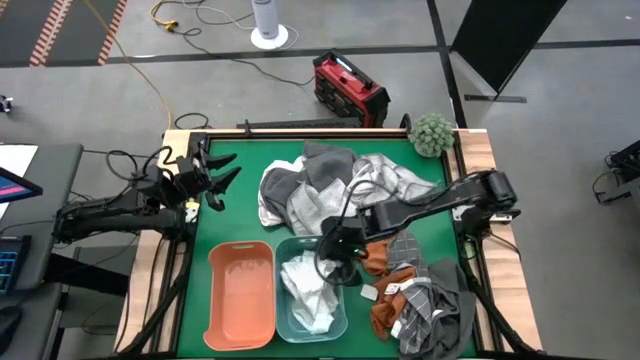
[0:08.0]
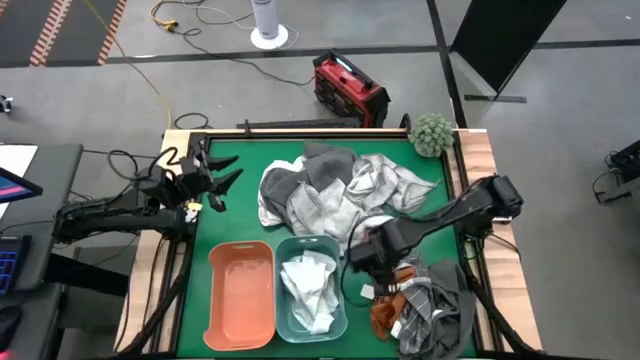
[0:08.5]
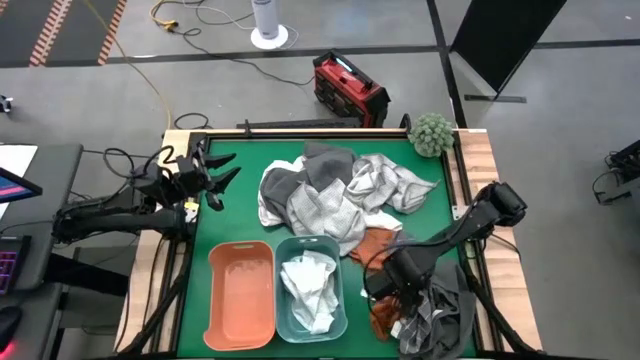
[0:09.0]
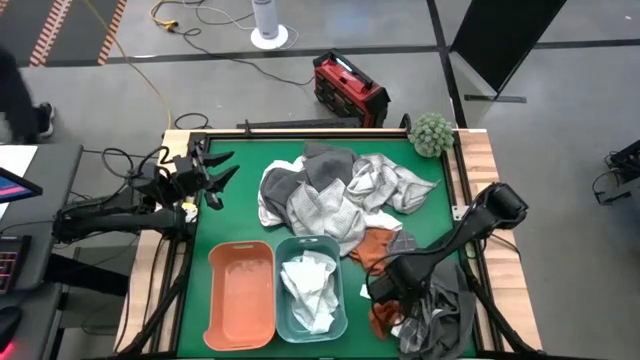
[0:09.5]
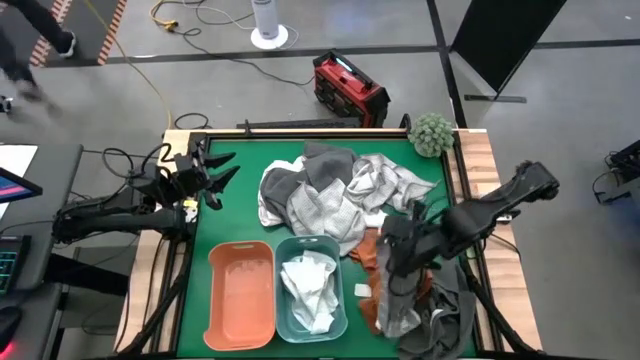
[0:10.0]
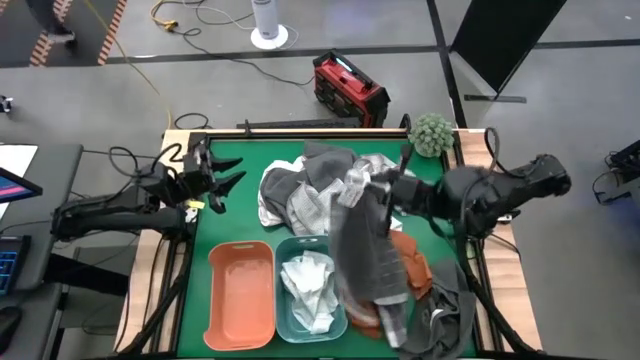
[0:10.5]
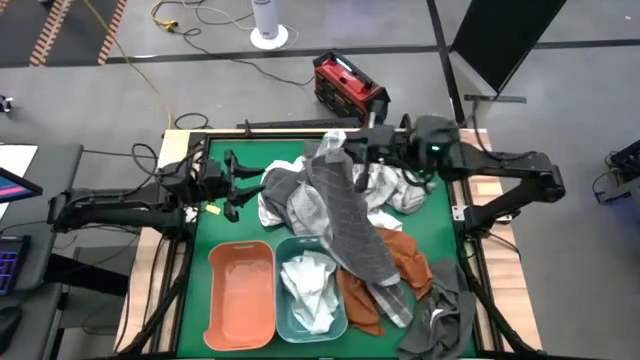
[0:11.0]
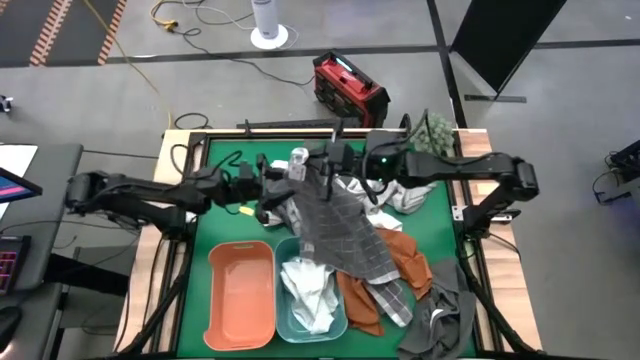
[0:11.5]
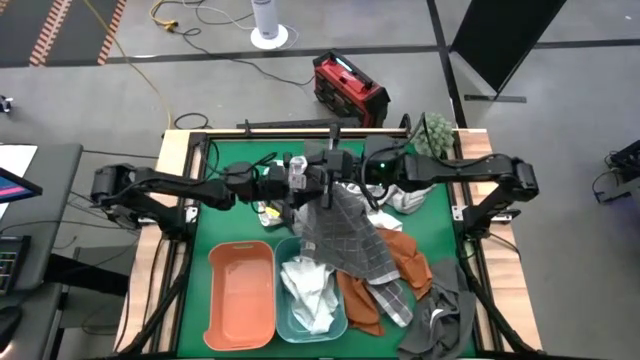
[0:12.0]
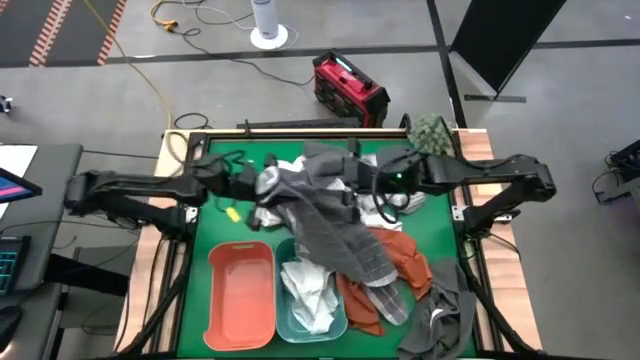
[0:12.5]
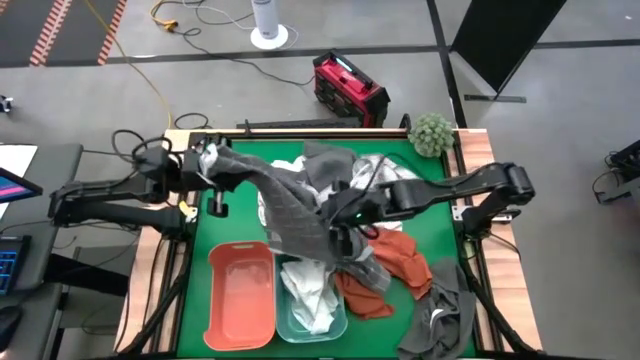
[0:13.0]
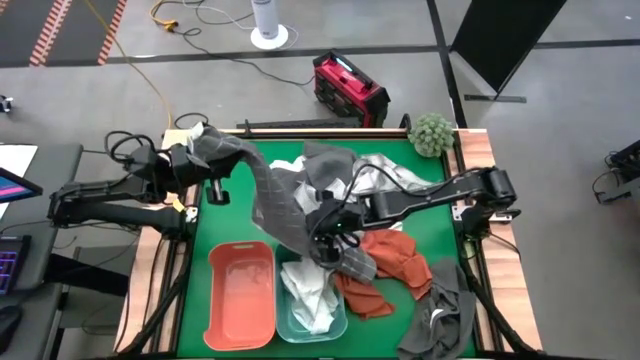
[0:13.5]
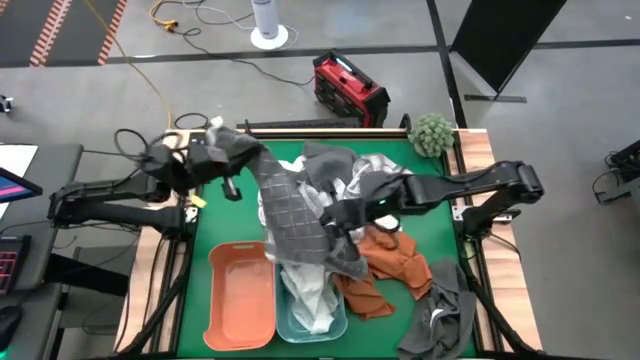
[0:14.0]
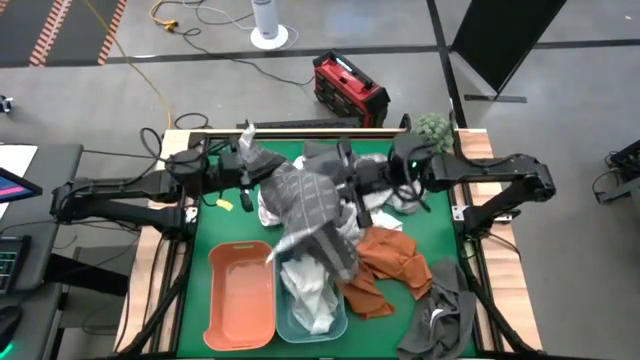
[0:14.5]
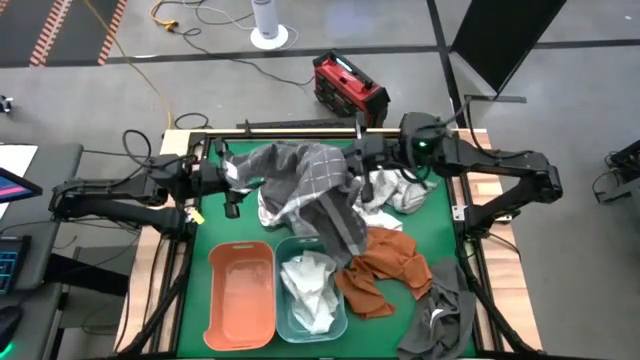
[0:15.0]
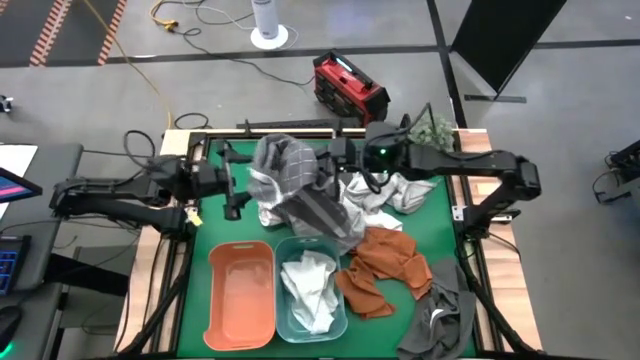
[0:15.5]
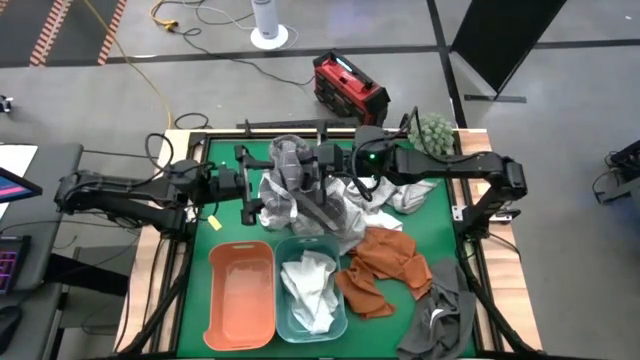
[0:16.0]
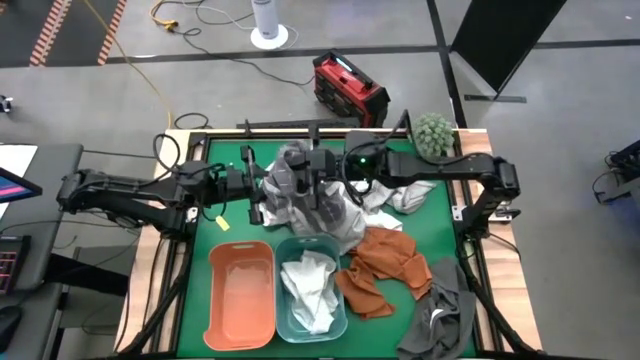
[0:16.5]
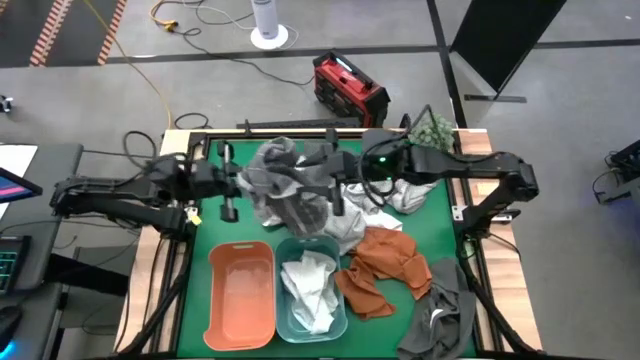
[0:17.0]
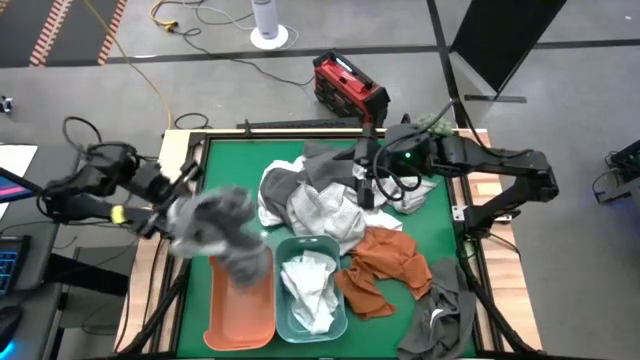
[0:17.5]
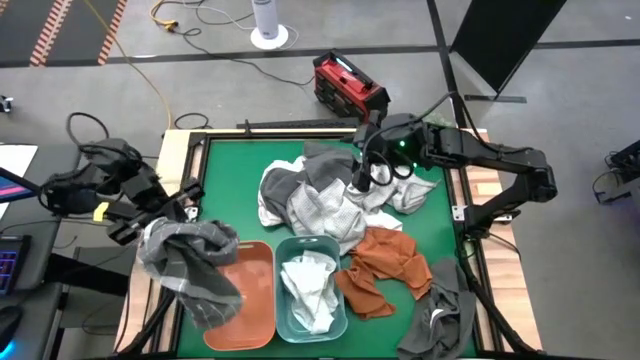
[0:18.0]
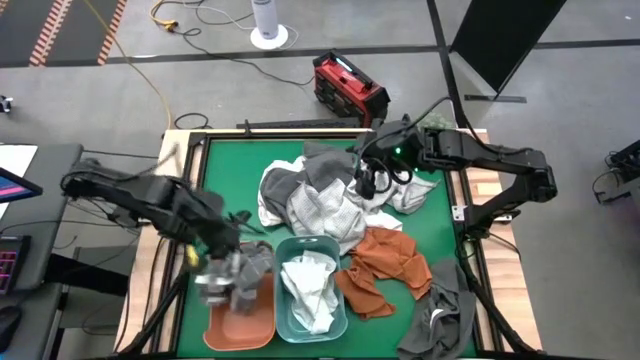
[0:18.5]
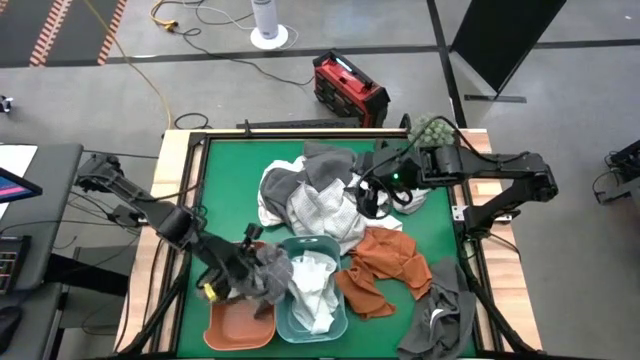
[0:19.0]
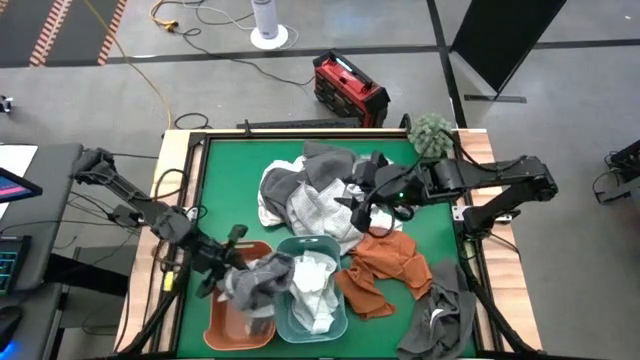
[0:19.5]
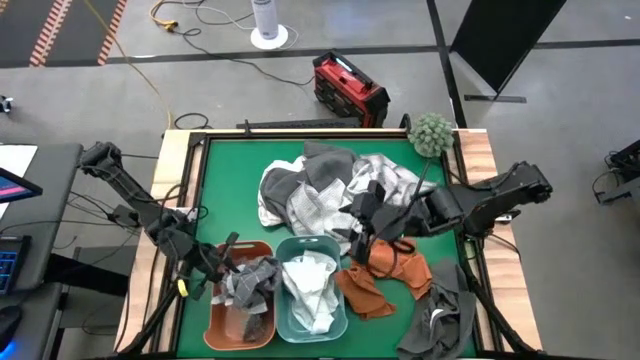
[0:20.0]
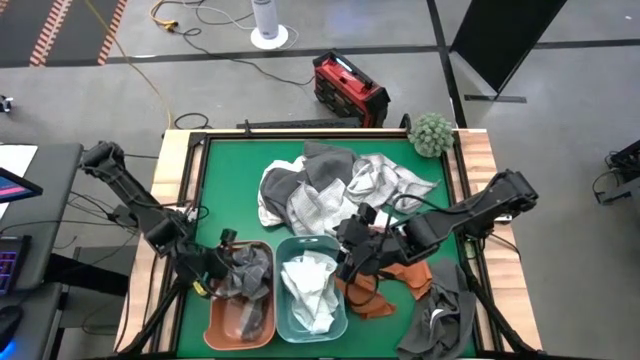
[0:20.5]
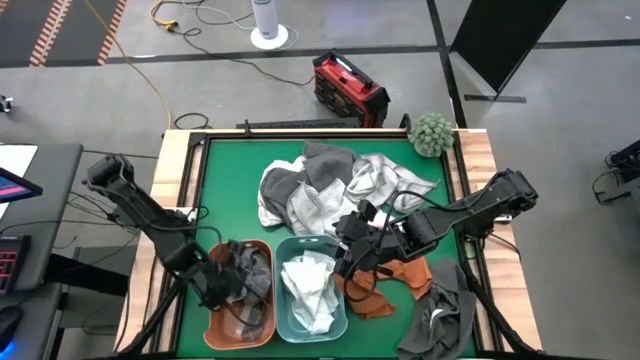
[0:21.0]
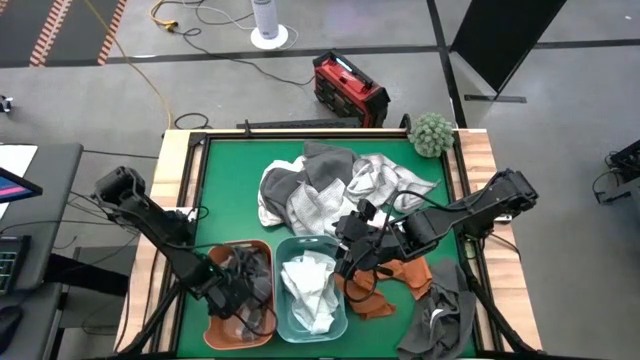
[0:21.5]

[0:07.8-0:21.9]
Task: Sort towels by color in basket
Put the gray checkered towel into the orange bin

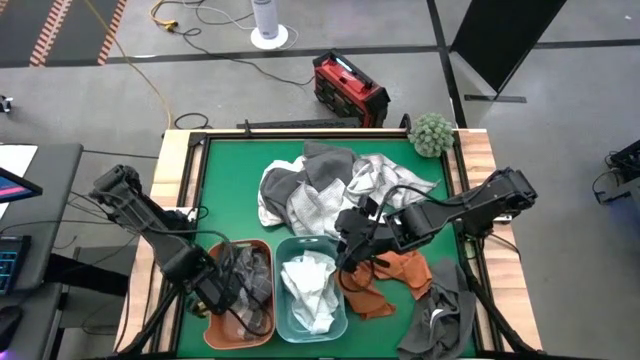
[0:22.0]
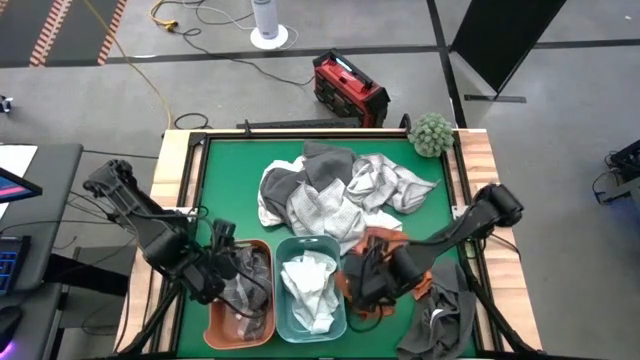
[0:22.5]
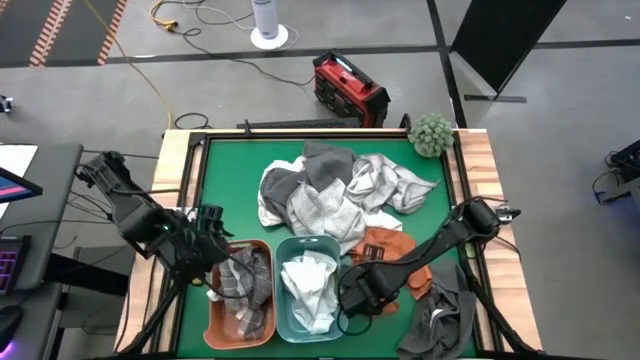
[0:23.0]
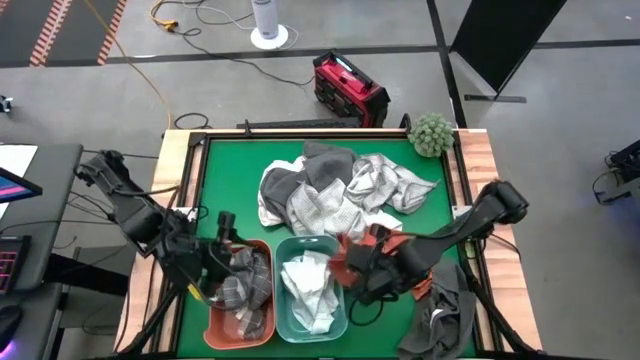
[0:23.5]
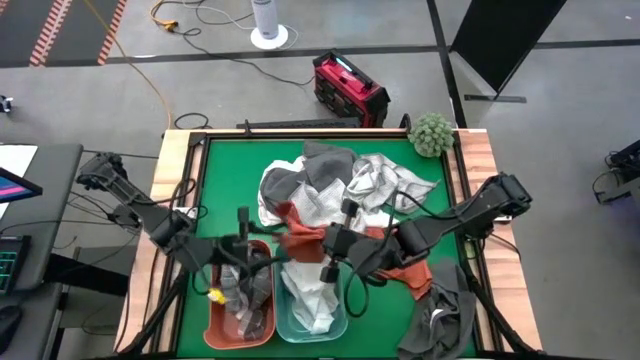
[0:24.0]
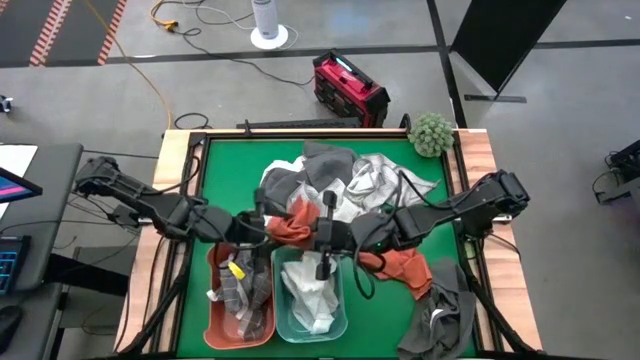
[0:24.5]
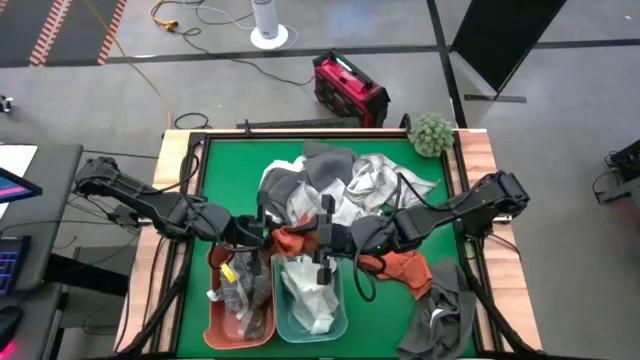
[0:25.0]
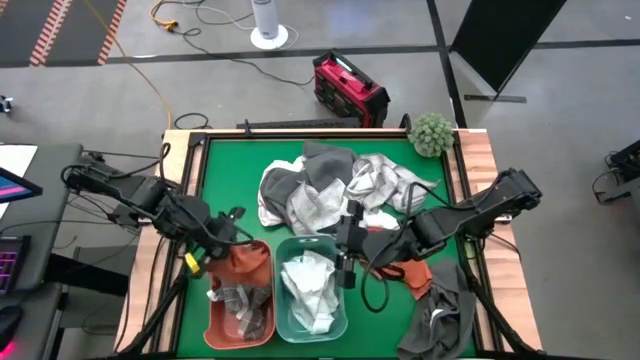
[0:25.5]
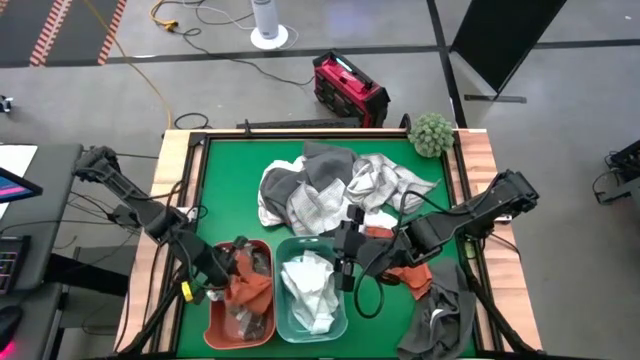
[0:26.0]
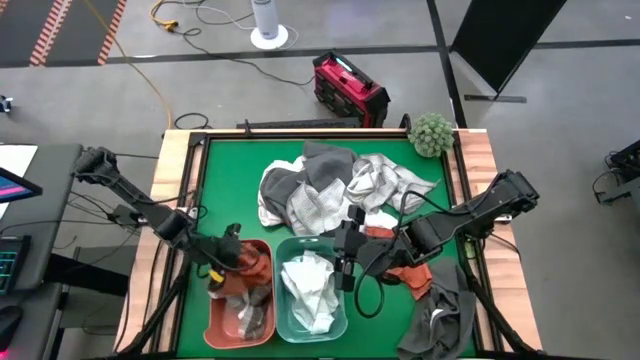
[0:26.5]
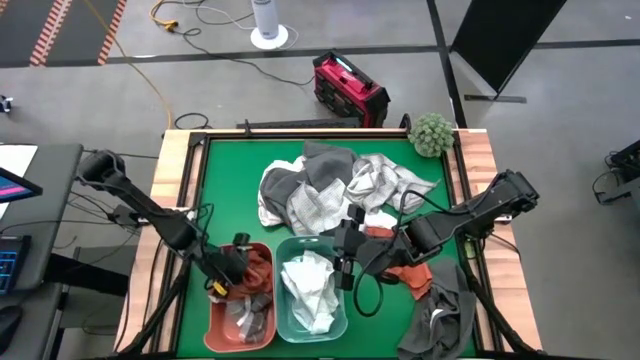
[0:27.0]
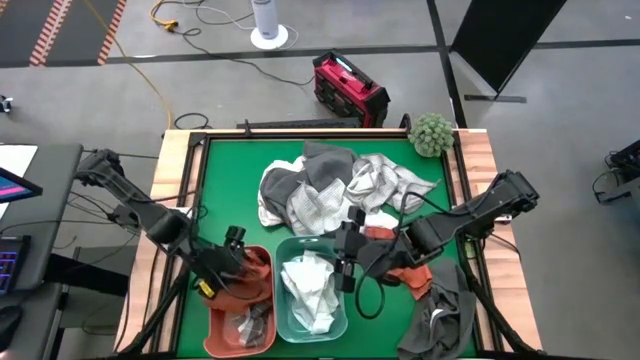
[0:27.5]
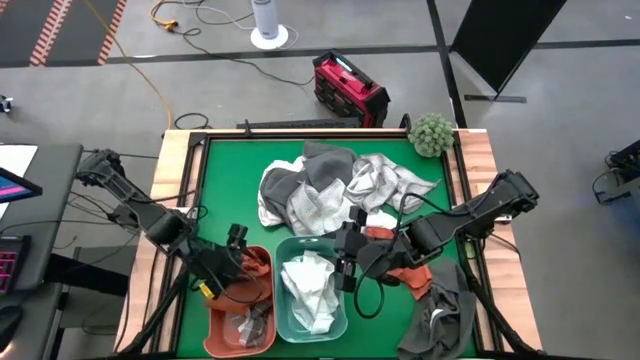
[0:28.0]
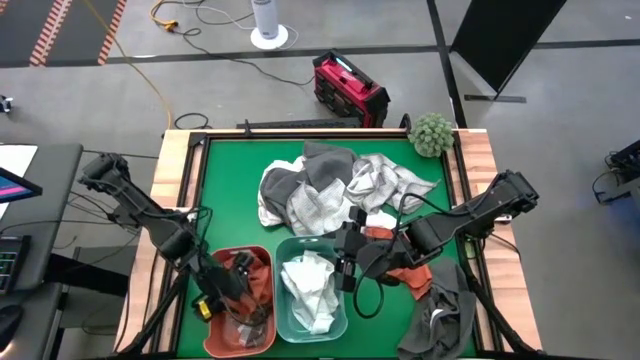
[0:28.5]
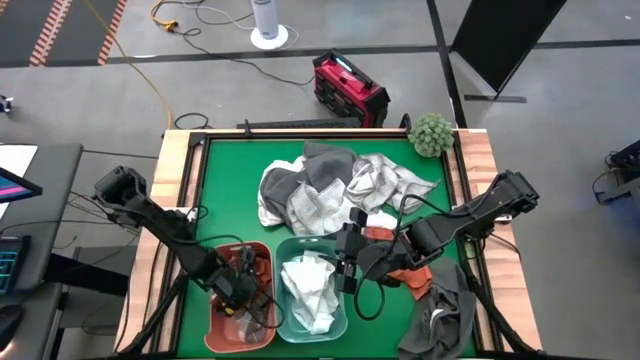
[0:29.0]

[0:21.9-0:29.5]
Put the bottom orange towel into the orange bin
